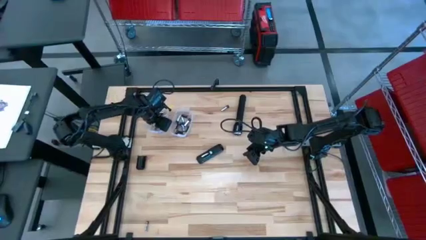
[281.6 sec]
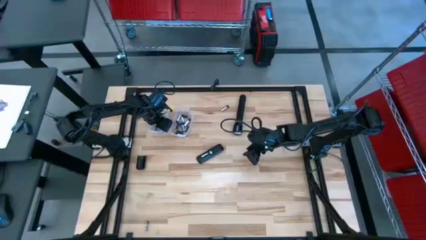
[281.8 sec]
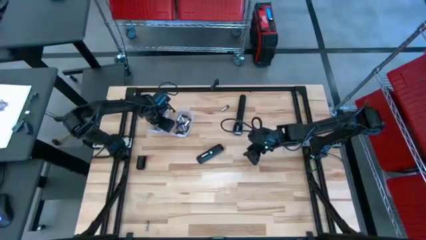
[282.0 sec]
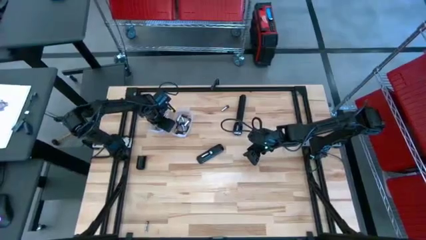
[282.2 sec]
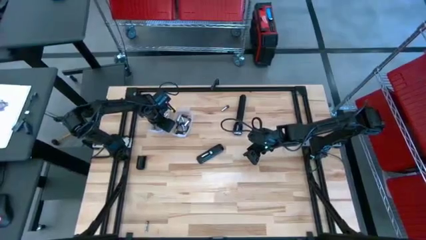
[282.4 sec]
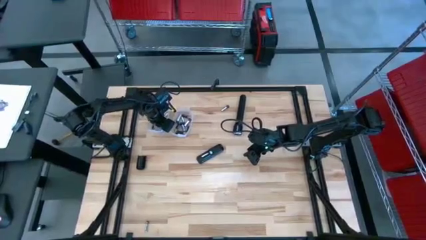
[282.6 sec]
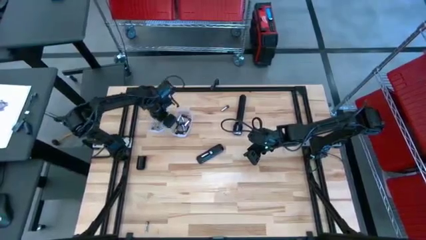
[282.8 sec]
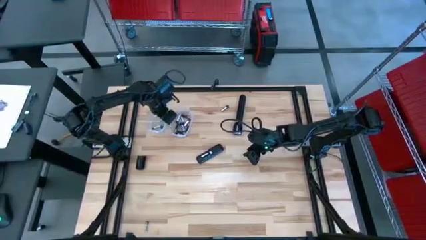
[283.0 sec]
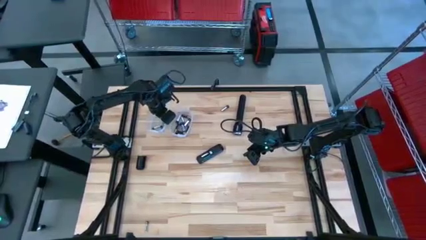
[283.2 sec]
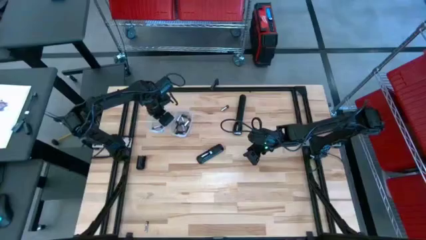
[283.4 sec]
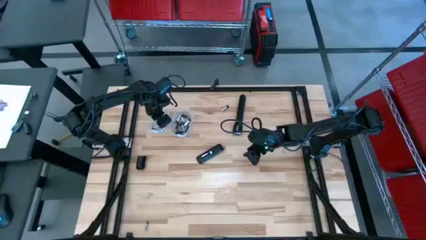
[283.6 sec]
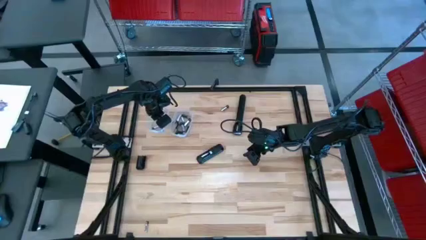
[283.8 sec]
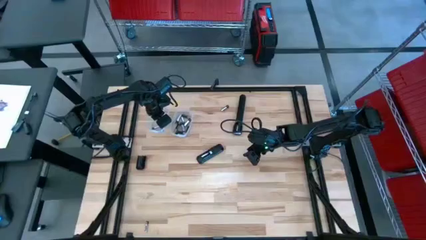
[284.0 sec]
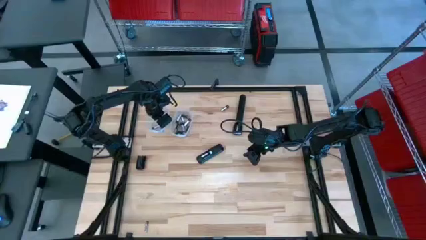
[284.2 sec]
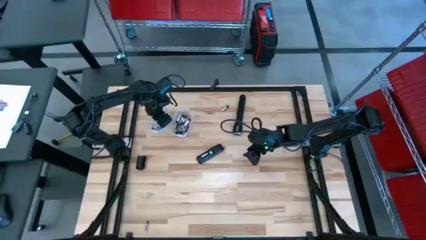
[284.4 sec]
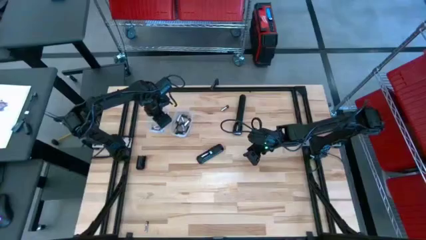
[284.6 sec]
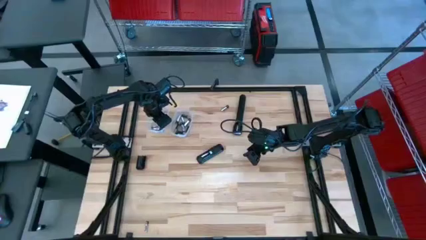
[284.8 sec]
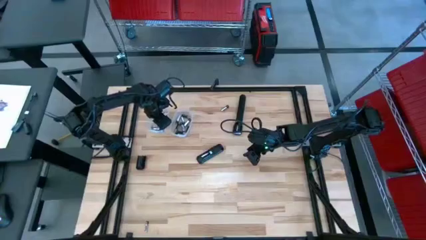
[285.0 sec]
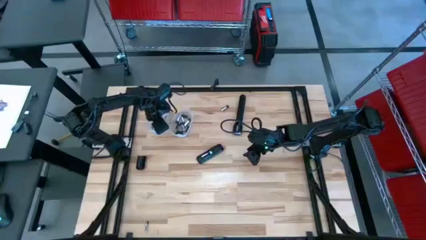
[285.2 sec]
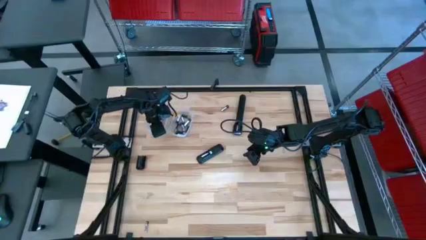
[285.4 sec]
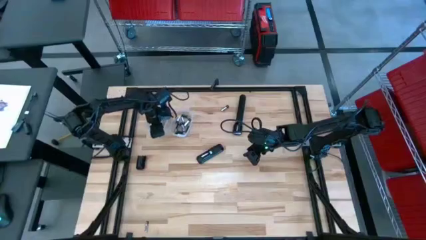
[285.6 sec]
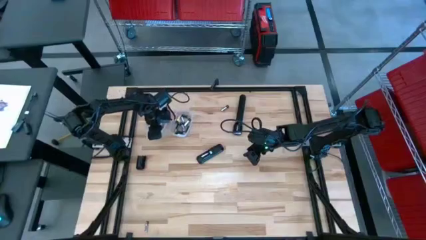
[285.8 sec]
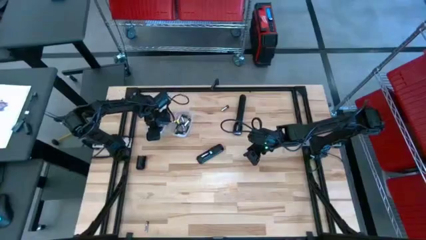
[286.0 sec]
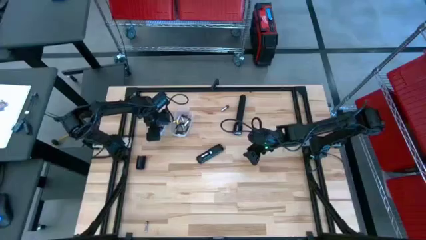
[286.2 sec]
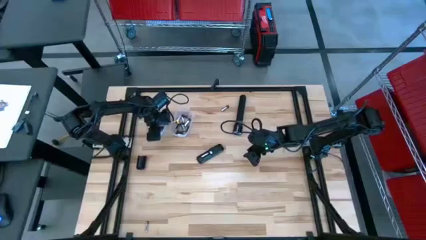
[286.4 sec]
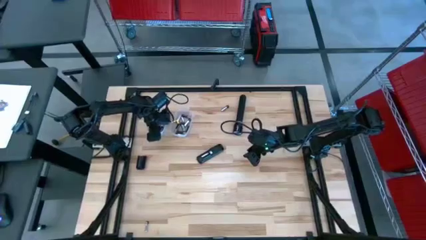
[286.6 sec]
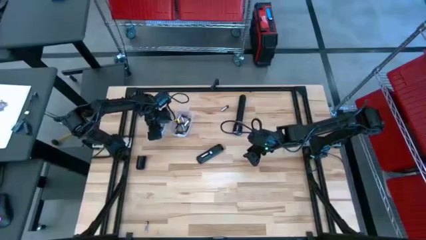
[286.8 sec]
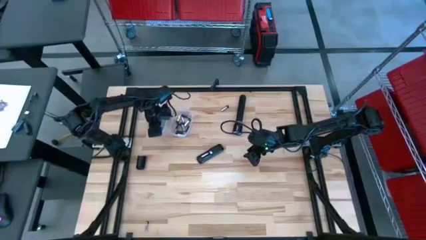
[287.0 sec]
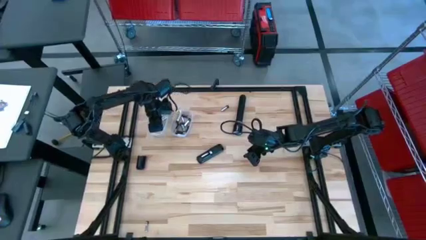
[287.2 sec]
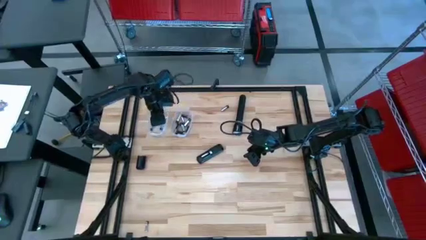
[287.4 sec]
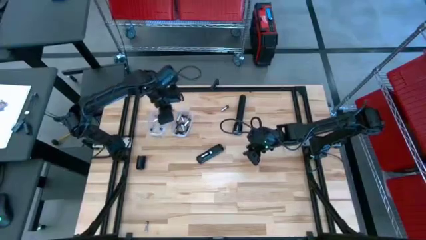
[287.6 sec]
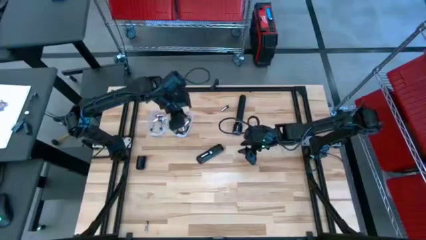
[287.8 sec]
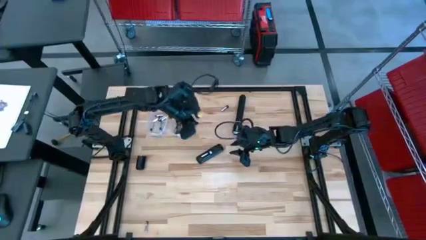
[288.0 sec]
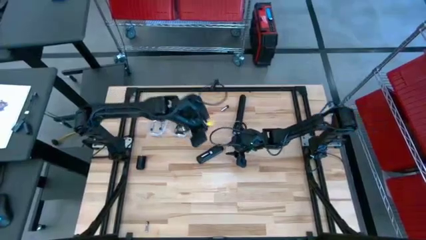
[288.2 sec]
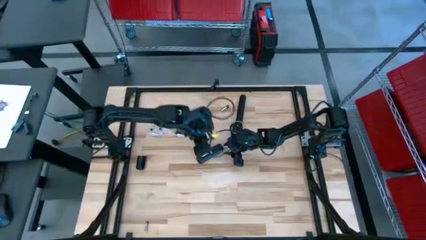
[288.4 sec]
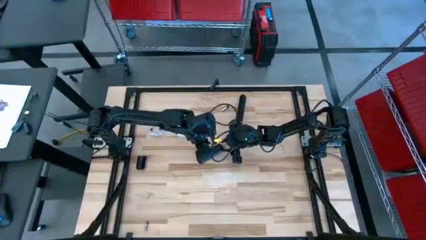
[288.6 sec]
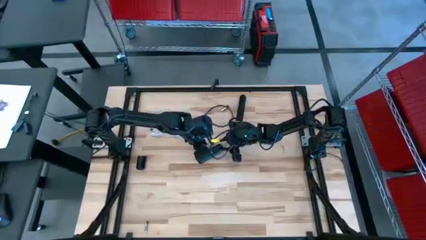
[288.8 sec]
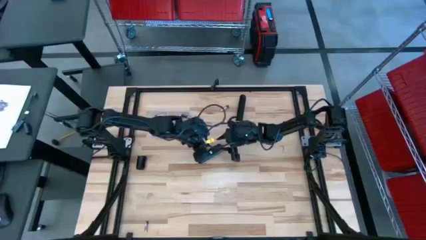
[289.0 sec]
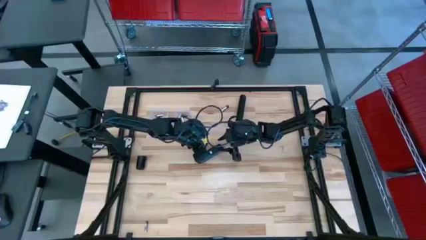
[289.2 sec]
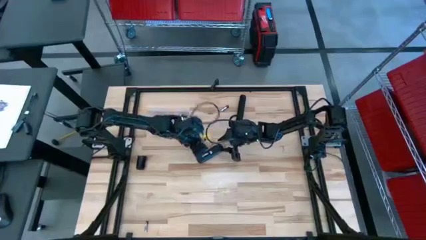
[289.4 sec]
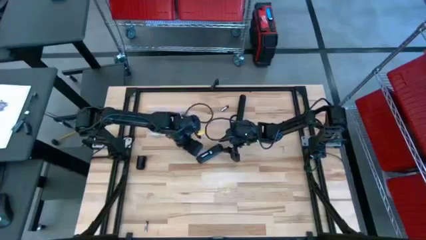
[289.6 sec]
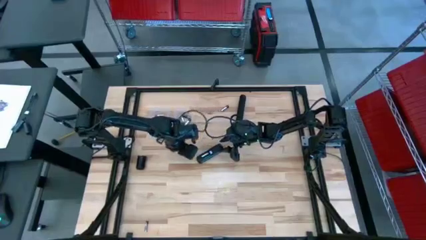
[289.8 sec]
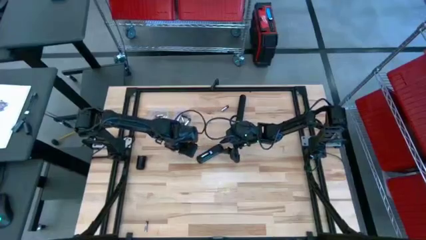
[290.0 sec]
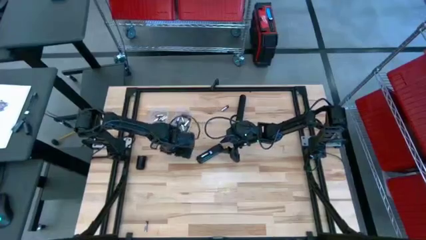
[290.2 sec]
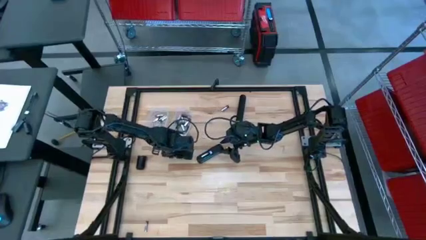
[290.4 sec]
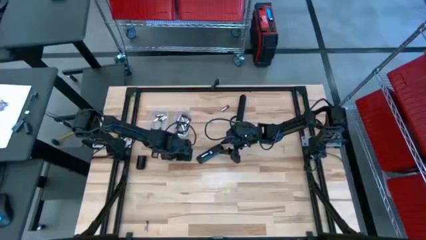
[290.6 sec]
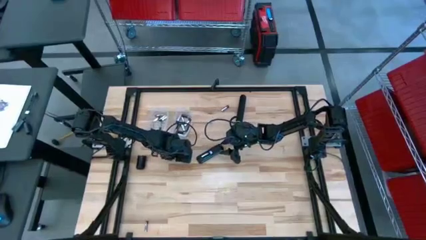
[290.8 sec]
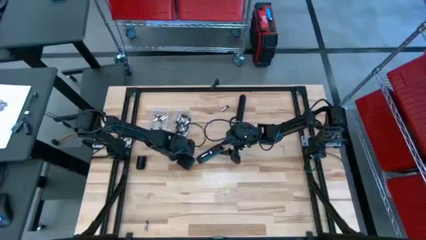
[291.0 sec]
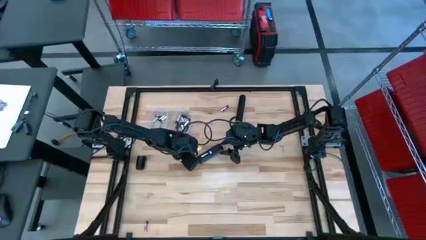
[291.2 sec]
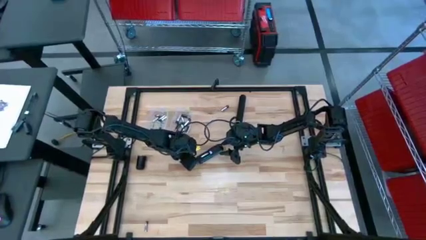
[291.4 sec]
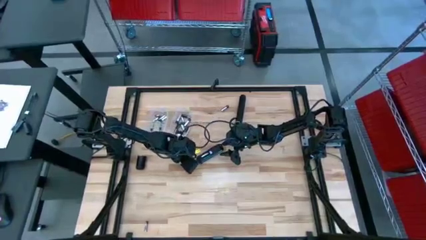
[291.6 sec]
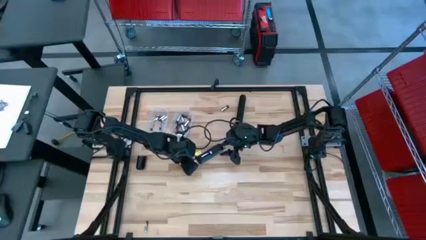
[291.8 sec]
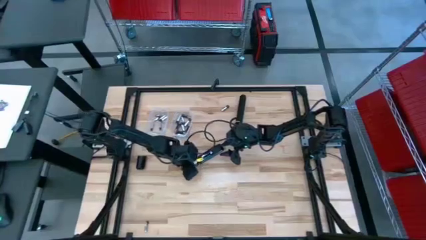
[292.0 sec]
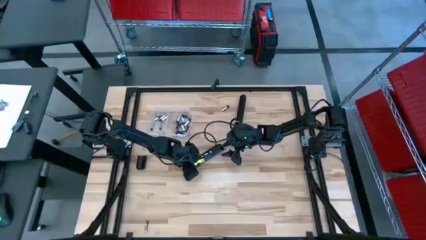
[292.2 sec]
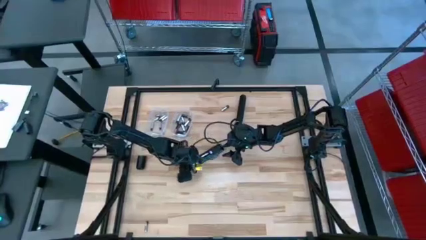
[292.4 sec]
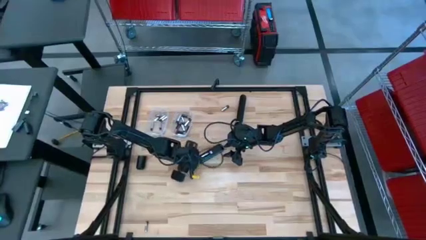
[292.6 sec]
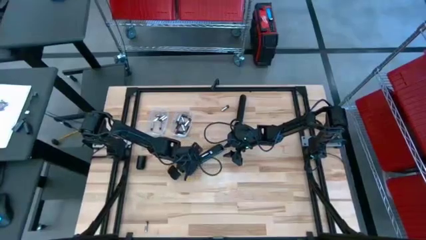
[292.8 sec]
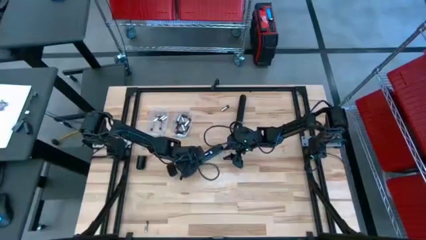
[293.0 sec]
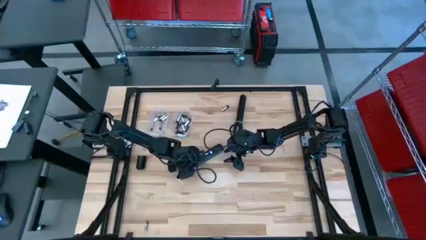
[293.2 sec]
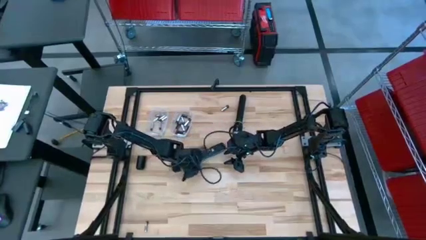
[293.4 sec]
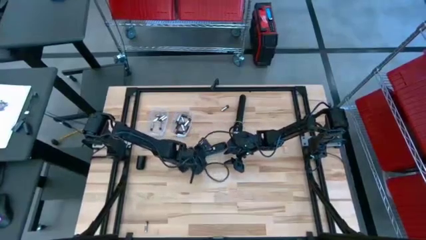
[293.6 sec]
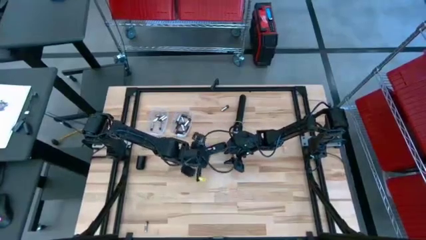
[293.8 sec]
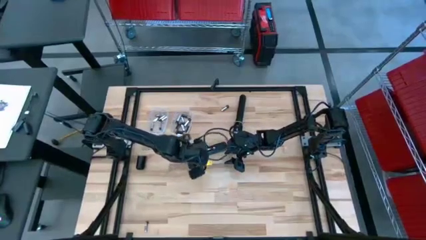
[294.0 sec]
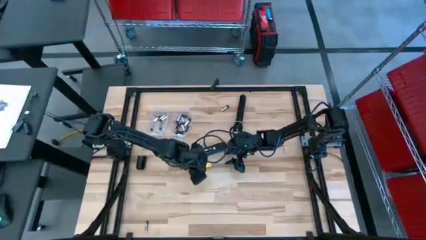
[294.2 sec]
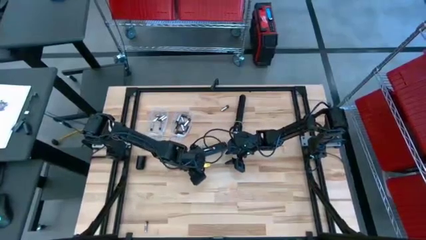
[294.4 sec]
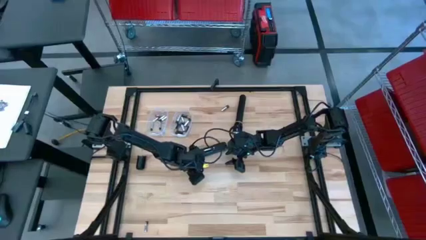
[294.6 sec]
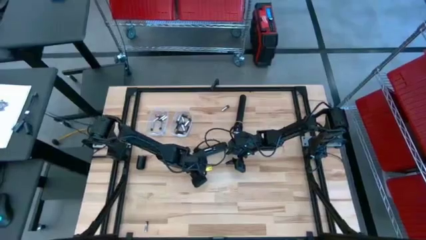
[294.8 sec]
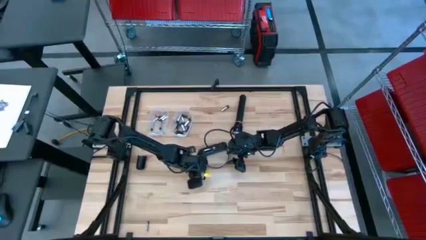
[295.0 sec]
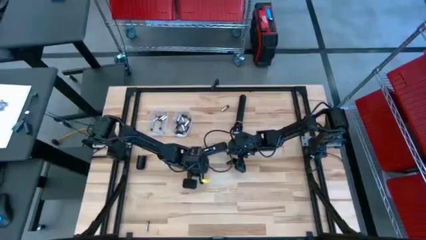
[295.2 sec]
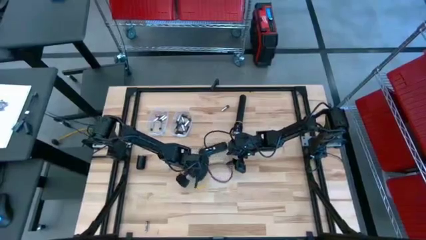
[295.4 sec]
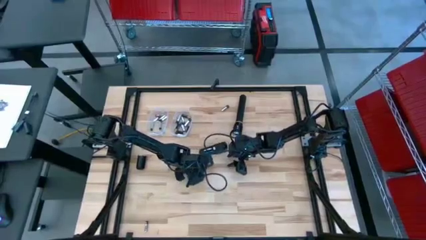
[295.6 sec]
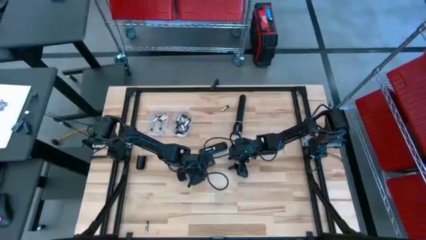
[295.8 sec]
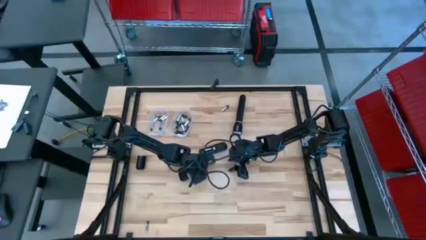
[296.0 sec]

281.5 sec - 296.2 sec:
Task: Insert battery
Insert the silver battery into the remote control battery compartment

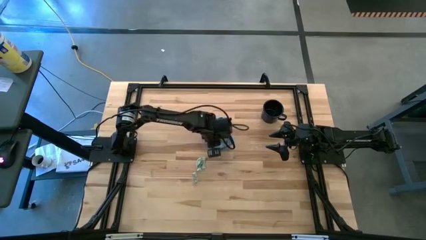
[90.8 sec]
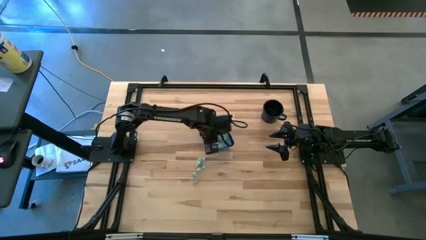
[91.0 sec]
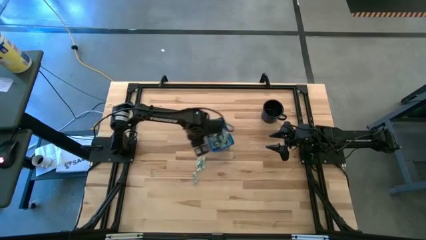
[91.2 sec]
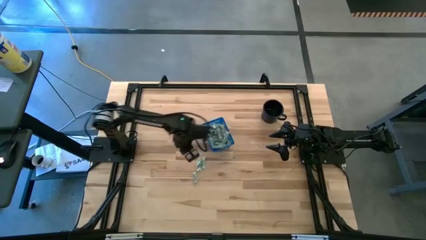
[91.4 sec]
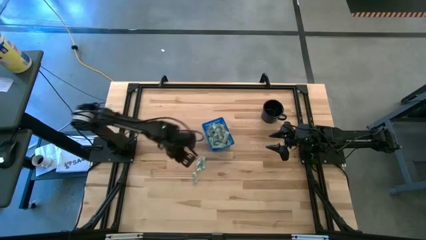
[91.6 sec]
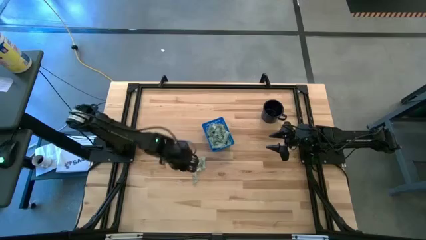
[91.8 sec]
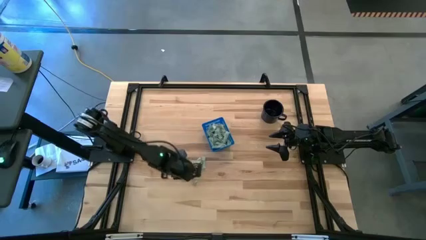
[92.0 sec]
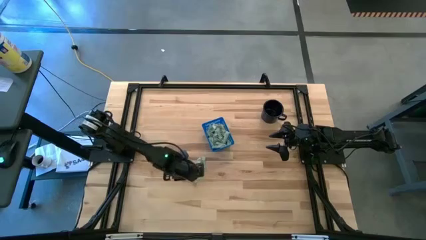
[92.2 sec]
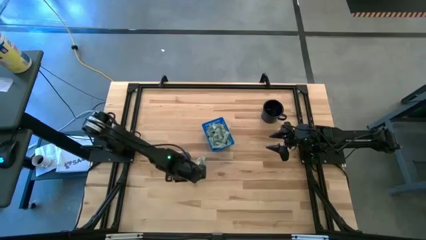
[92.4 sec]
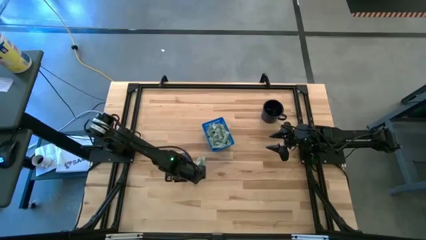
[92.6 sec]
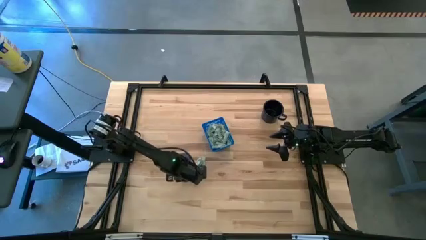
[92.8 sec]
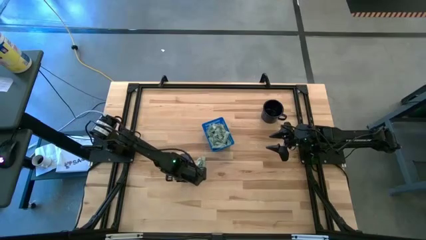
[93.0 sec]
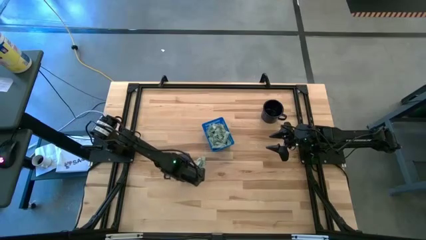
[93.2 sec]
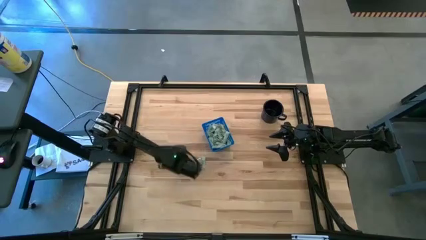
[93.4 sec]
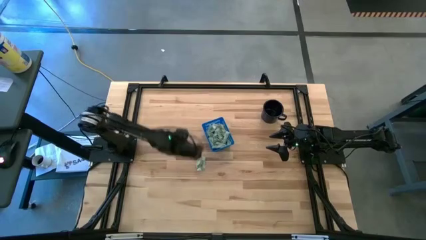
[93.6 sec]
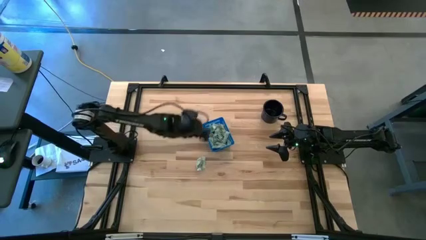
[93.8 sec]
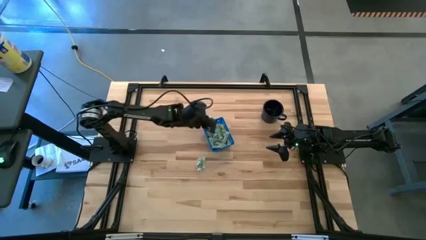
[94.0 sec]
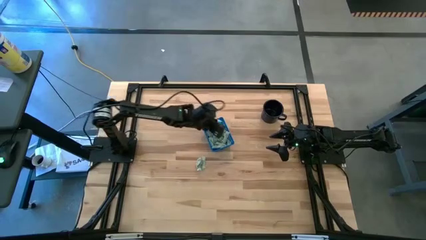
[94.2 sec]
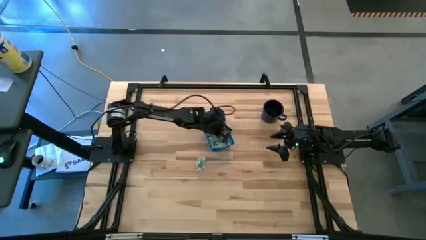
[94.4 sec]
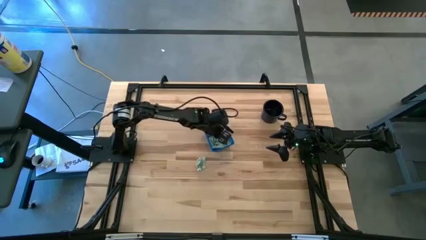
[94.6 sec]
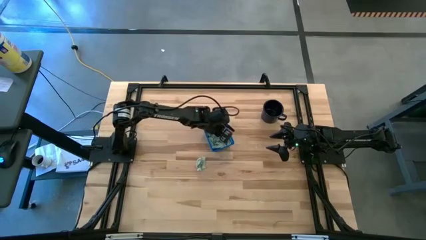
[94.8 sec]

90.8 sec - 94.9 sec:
Task: Pick and place Stevia / Truvia into bins
Put the stevia packet into the basket
